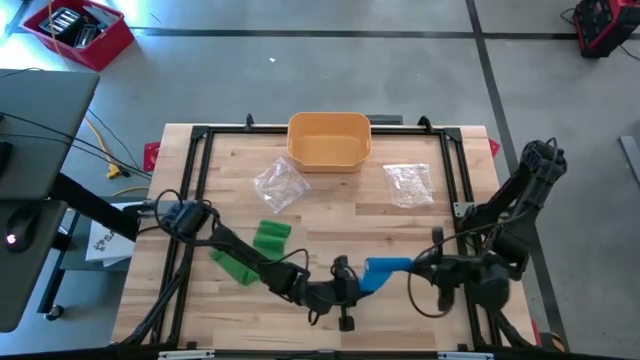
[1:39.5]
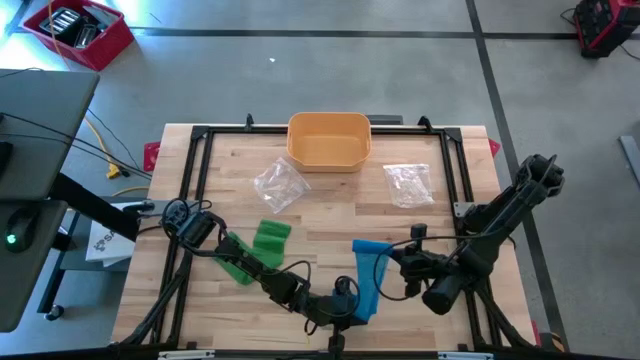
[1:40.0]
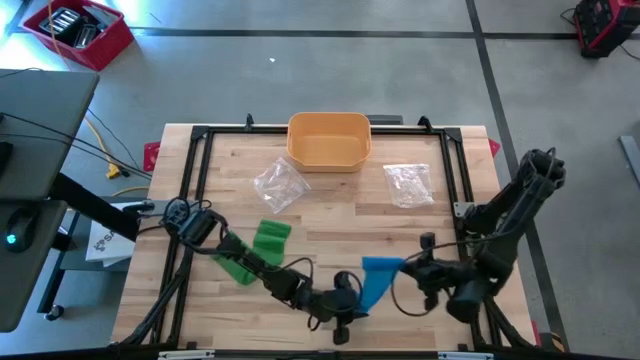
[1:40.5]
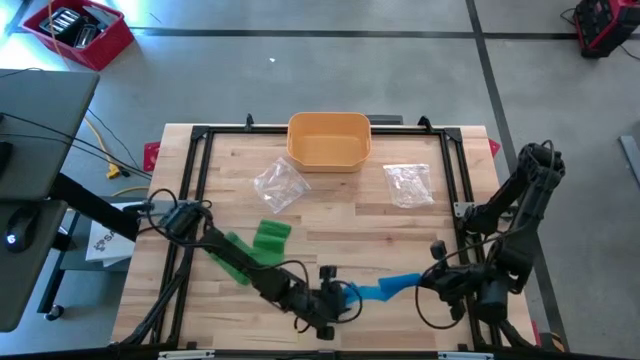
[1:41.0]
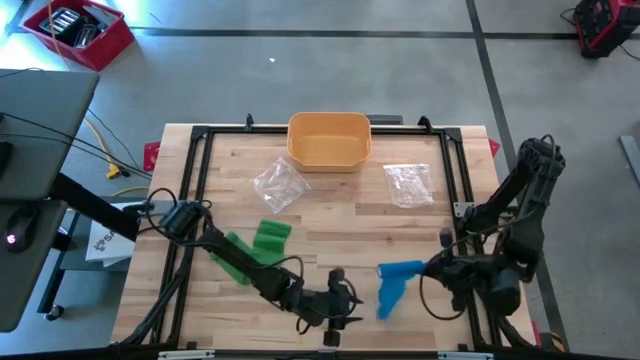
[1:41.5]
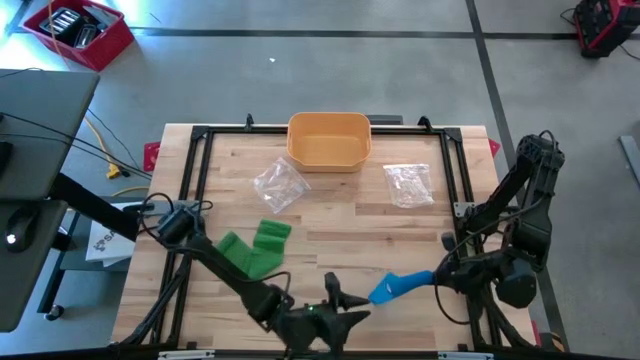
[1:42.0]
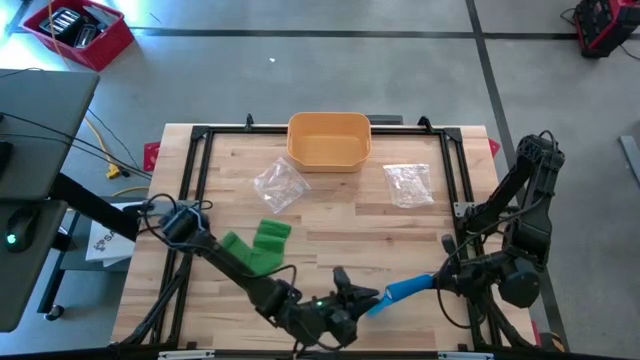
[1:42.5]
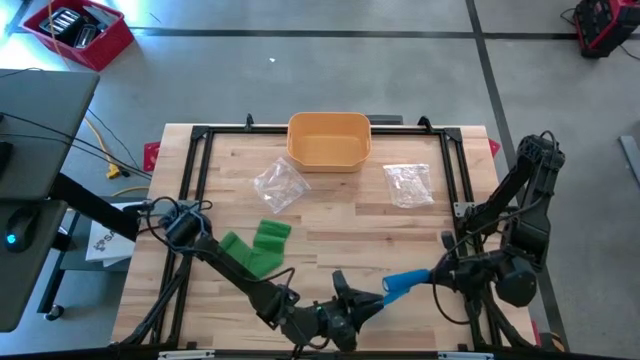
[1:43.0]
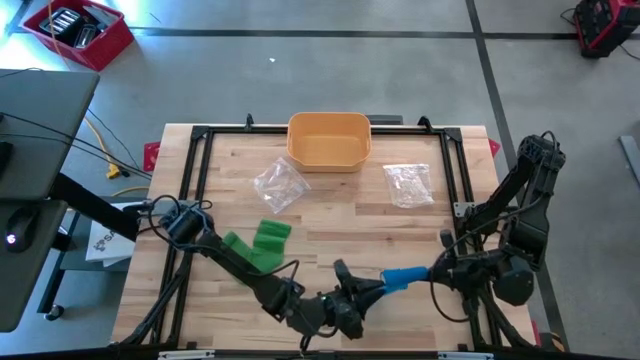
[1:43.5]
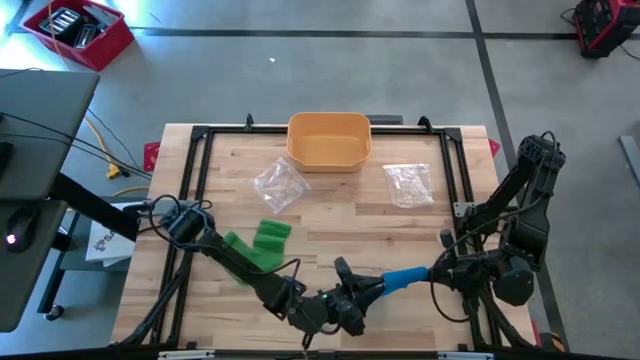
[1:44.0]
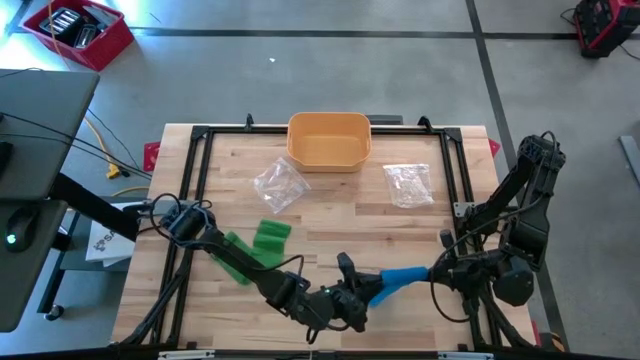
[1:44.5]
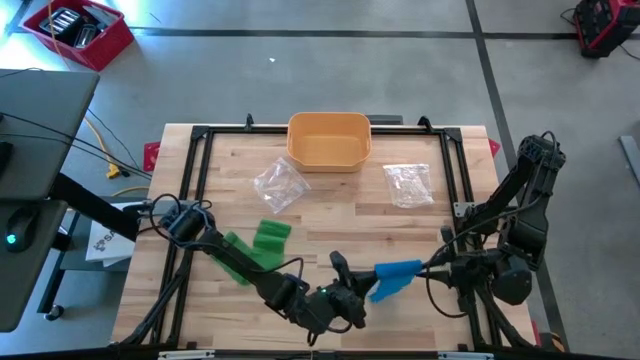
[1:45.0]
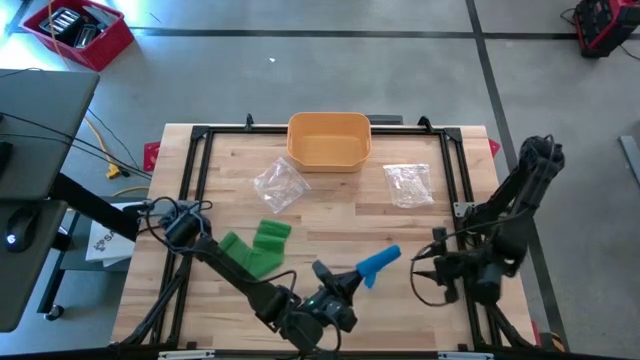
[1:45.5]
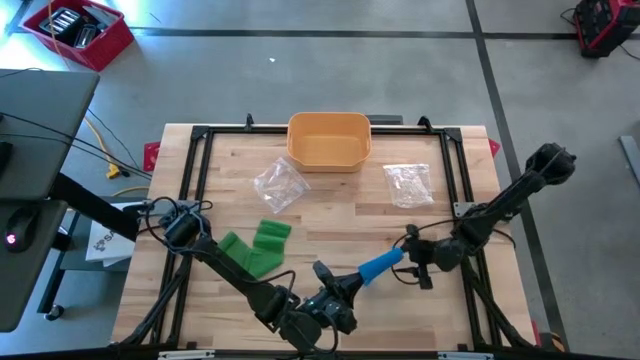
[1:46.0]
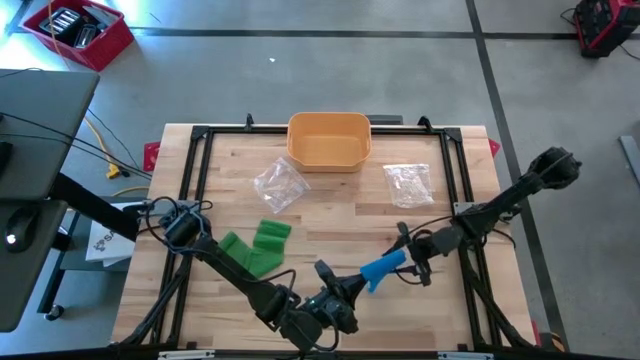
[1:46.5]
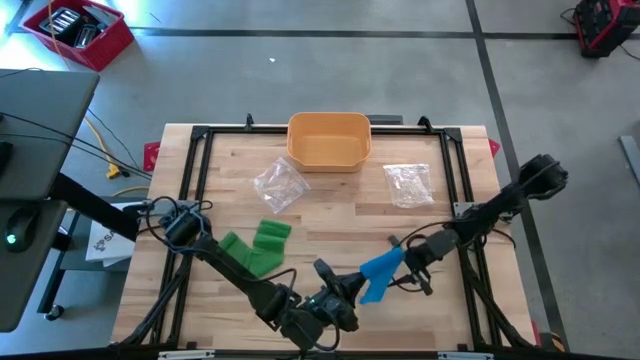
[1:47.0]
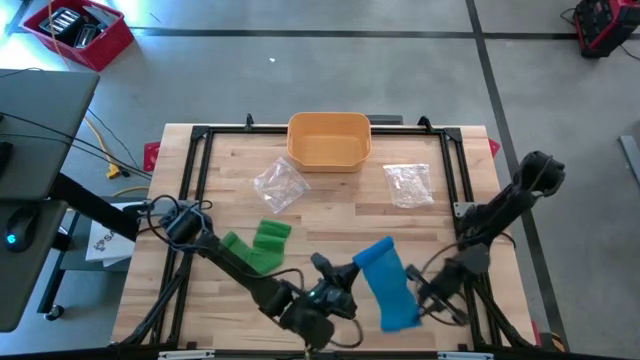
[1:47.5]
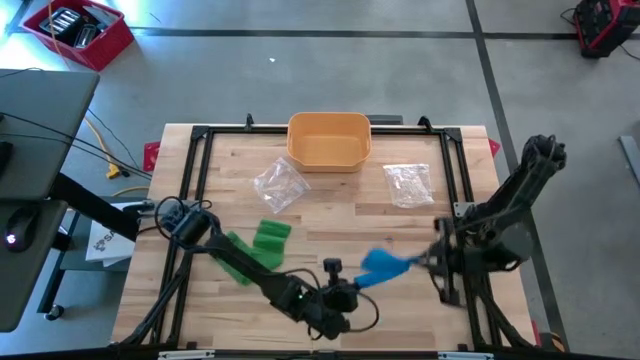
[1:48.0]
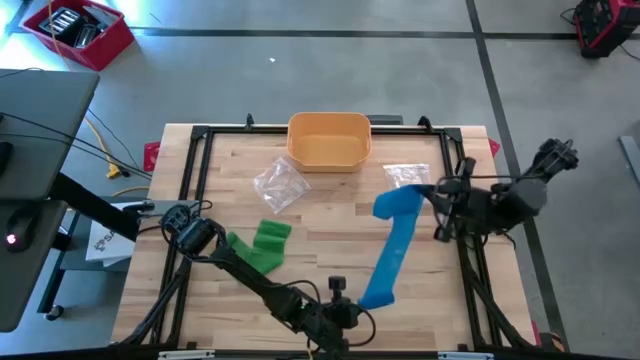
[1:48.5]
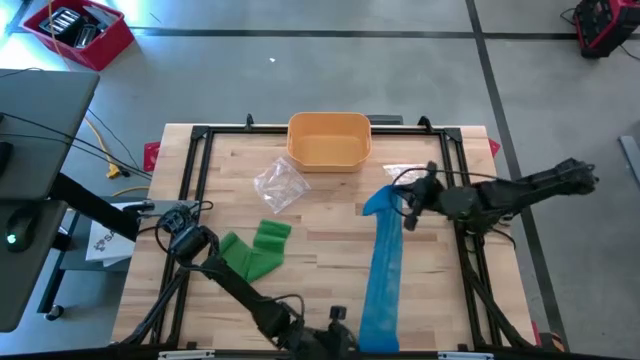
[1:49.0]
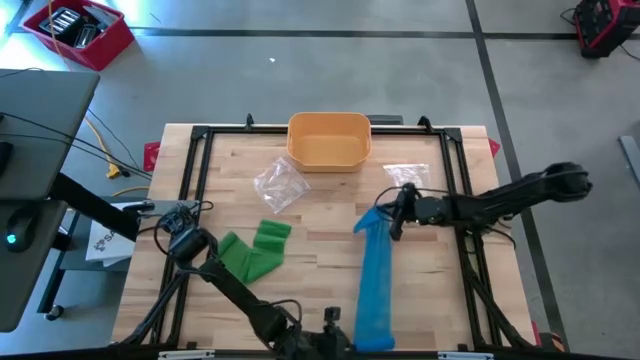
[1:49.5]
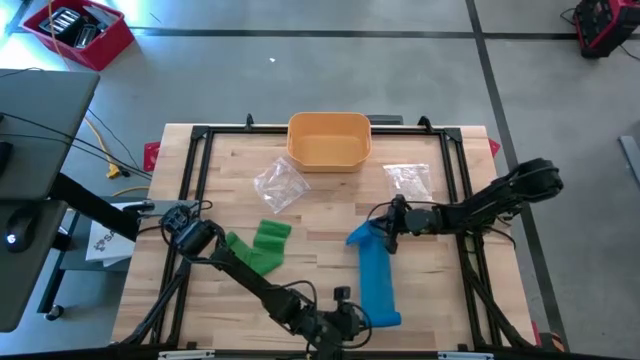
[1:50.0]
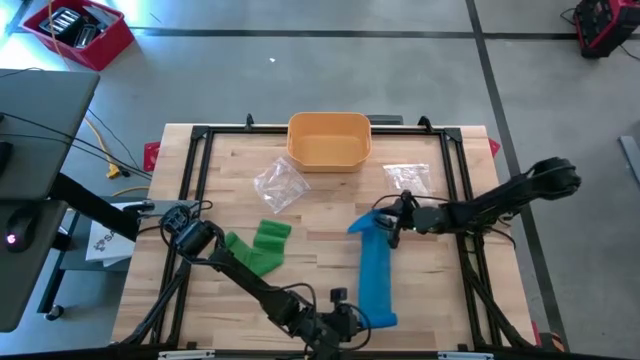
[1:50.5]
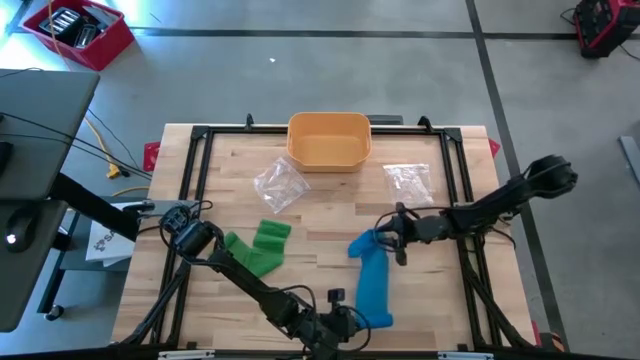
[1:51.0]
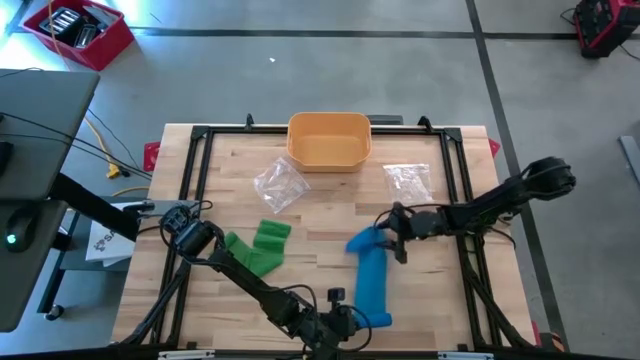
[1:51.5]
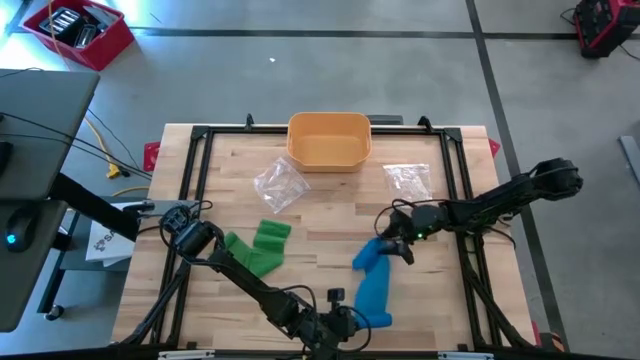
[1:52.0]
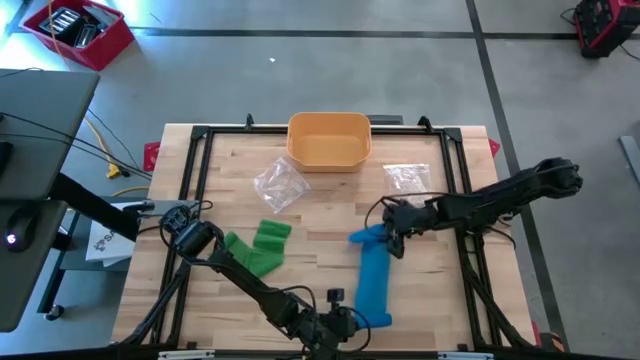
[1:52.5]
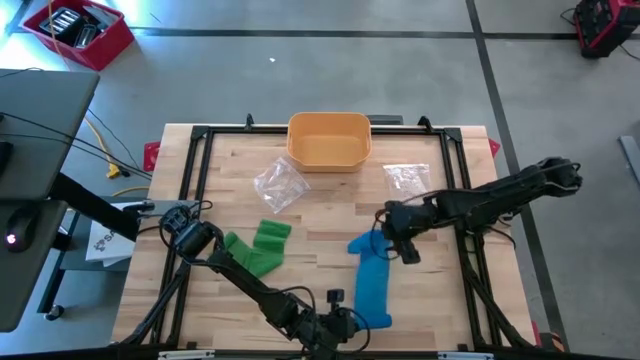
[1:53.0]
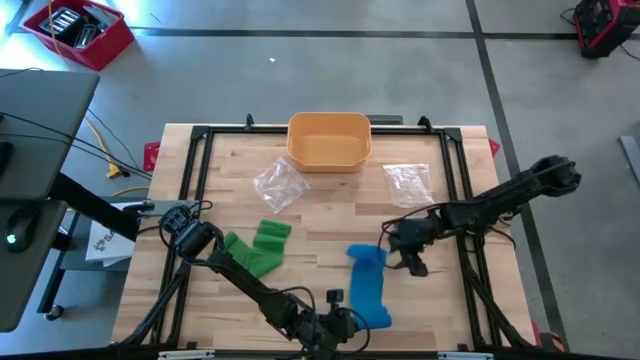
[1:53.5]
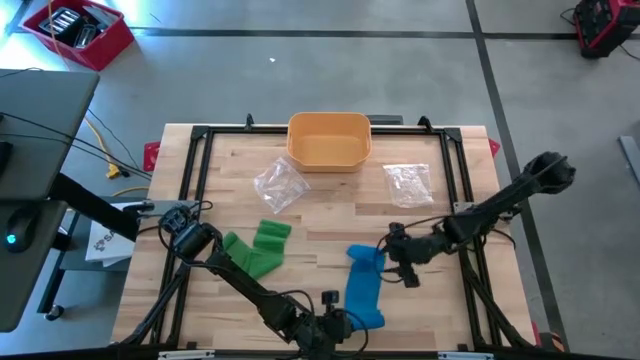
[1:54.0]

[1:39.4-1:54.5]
Task: Roll bandage
Roll the blue bandage

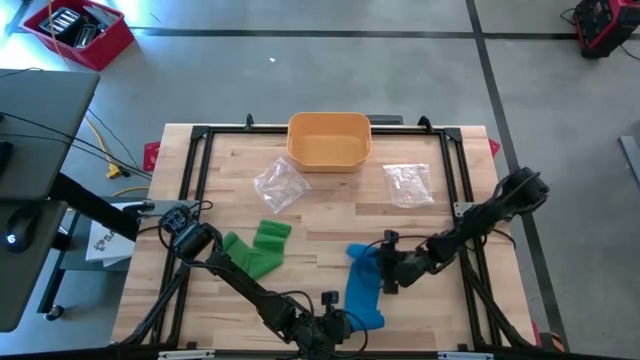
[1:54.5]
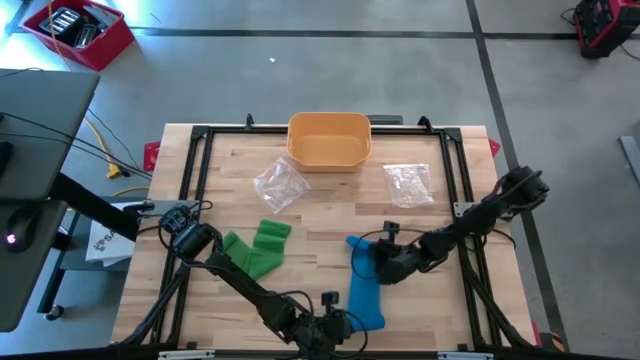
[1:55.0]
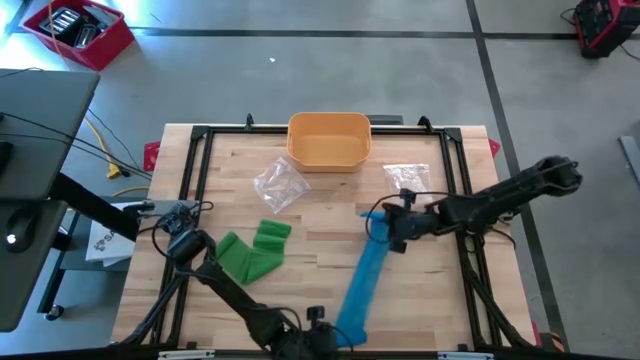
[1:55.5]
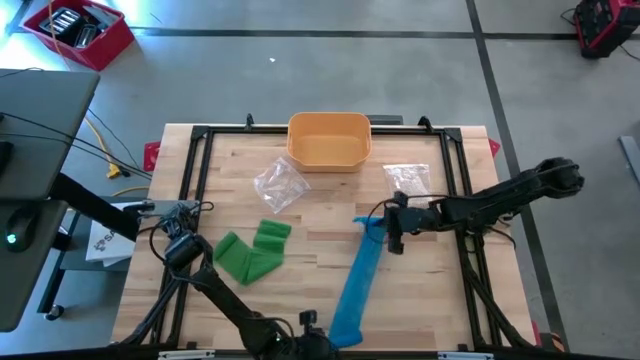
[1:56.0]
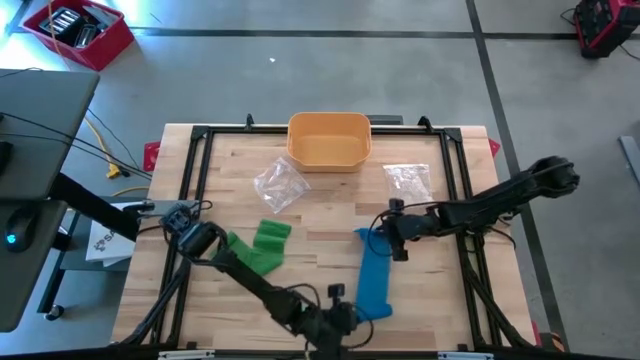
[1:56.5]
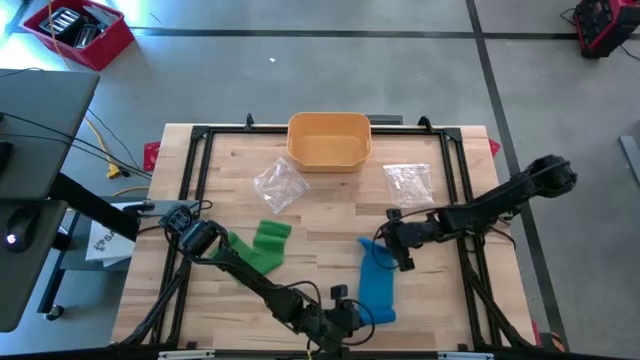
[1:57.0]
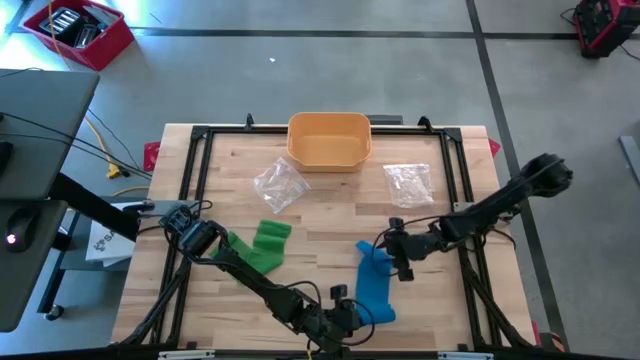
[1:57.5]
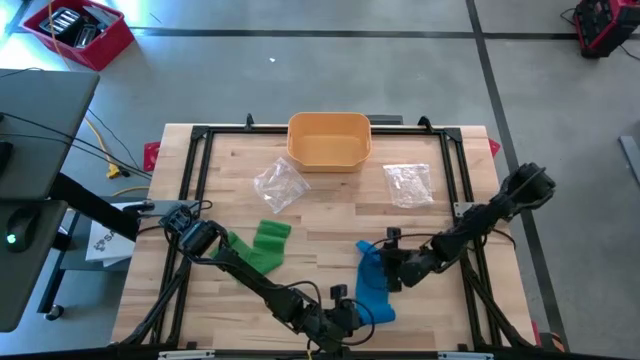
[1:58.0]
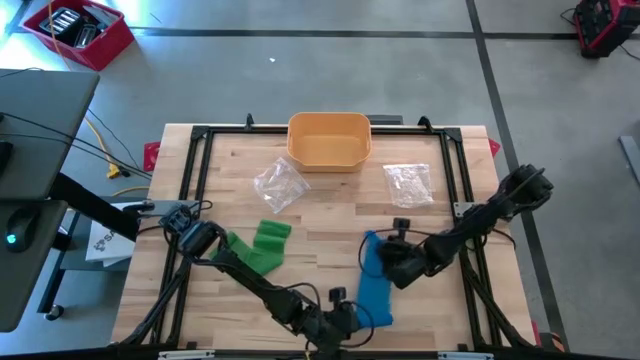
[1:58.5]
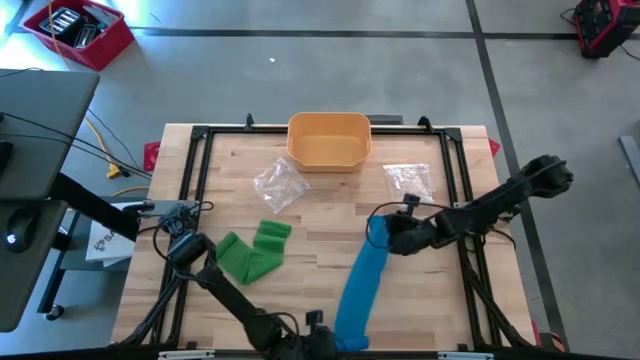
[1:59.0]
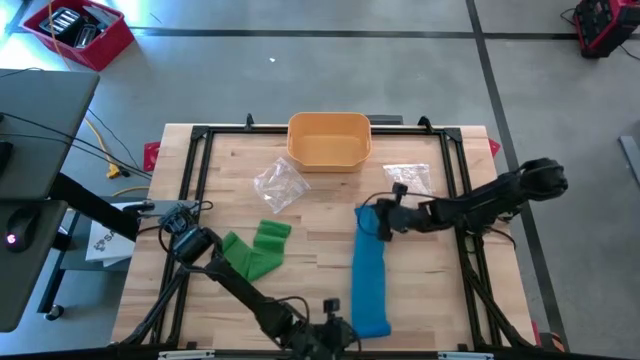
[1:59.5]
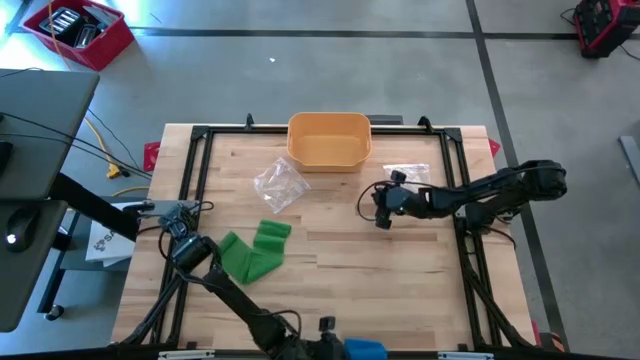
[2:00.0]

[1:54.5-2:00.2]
Roll the blue bandage

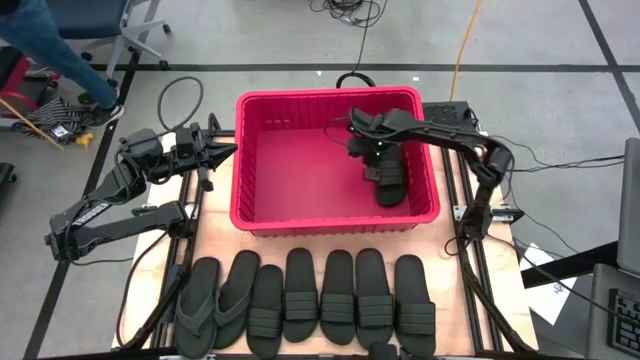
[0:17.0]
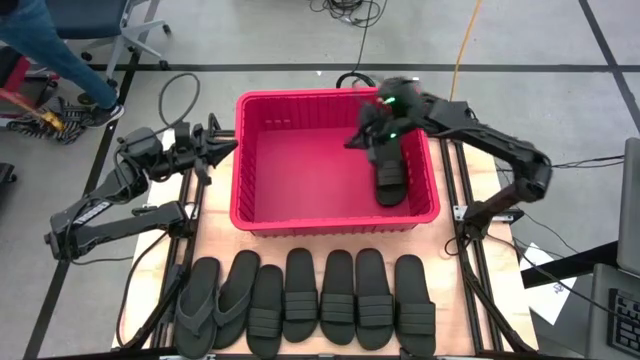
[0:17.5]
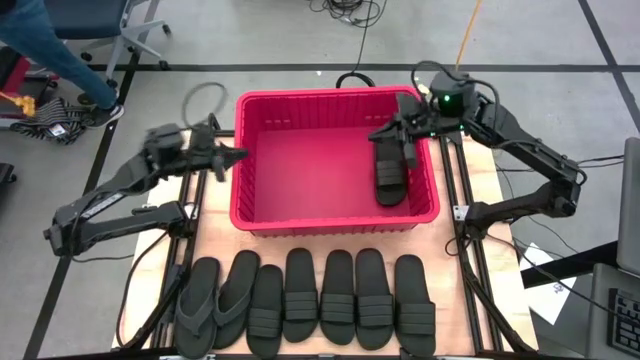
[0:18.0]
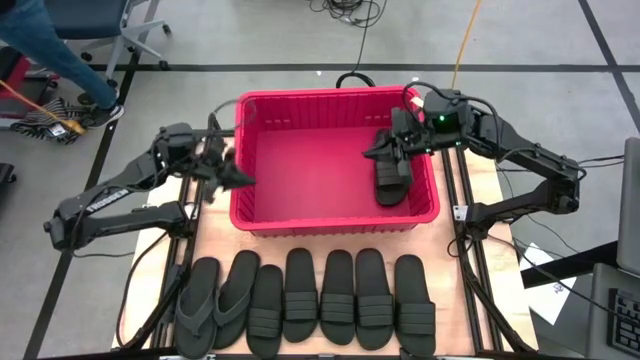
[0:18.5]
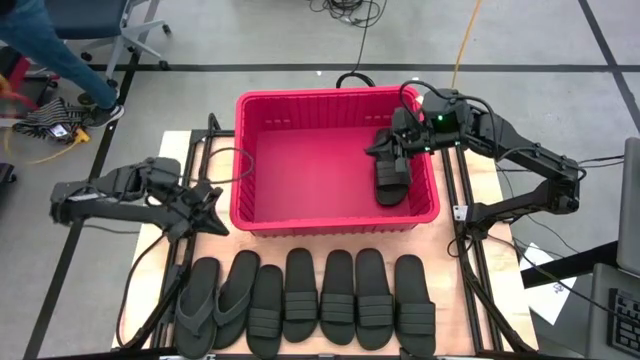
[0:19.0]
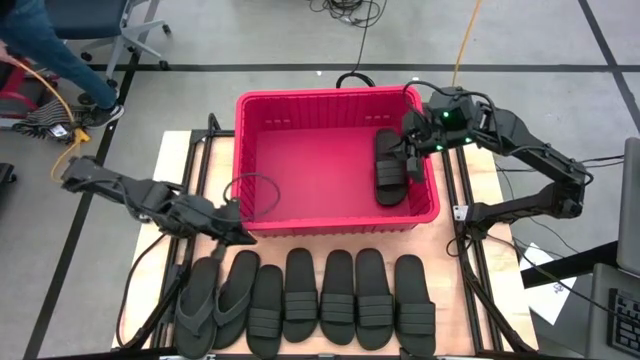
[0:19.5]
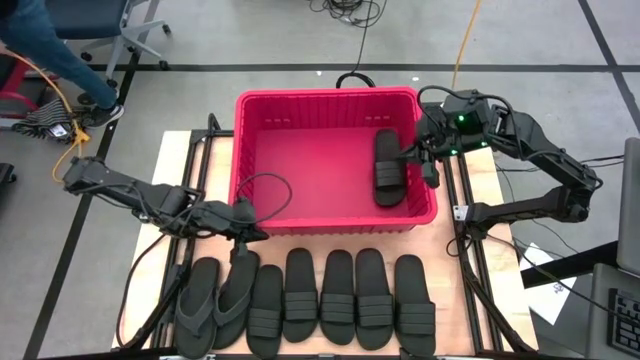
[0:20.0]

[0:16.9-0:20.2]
Task: Pick and place slides into bin
Adjust the red bin on the table
